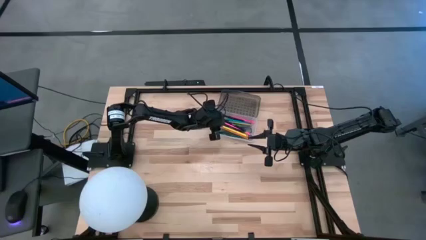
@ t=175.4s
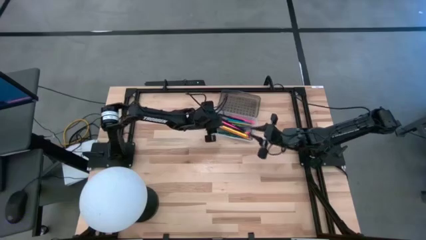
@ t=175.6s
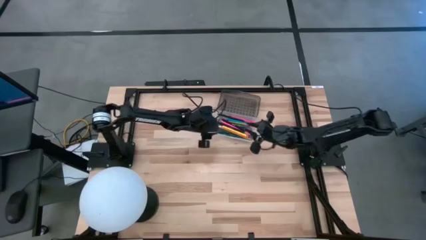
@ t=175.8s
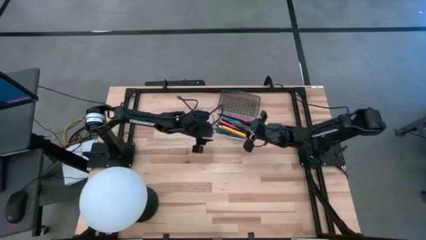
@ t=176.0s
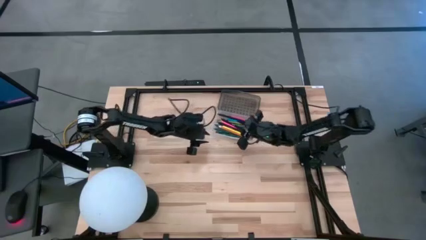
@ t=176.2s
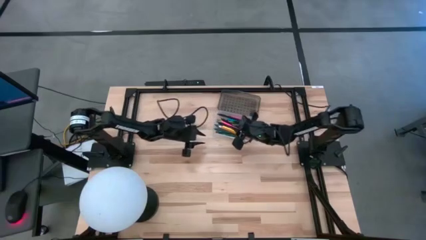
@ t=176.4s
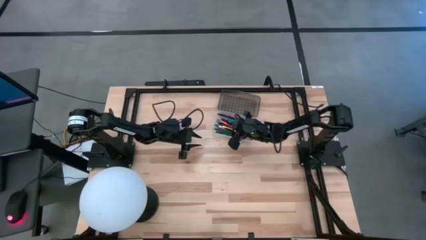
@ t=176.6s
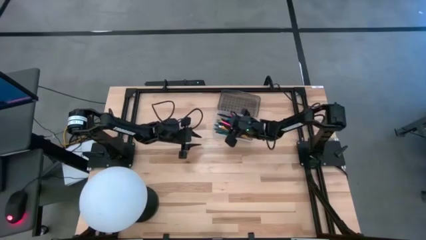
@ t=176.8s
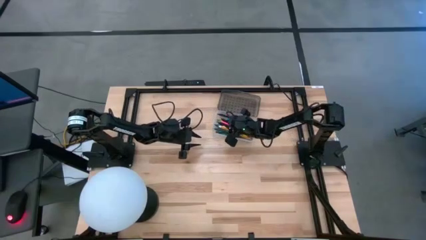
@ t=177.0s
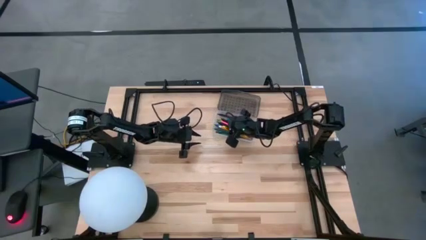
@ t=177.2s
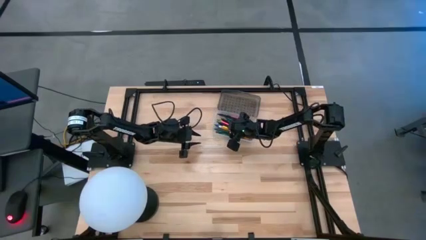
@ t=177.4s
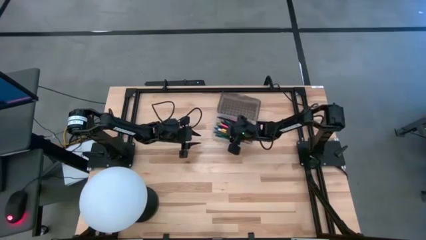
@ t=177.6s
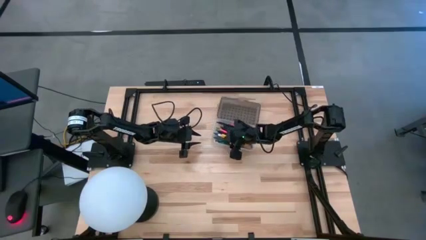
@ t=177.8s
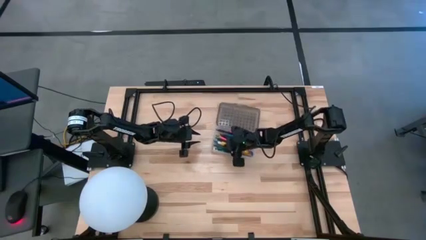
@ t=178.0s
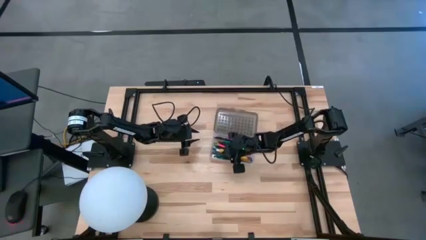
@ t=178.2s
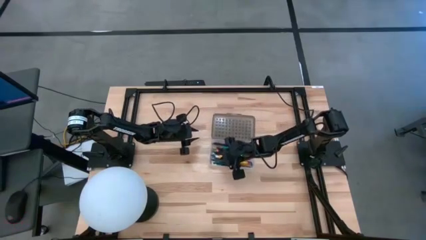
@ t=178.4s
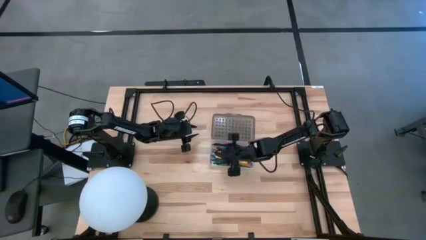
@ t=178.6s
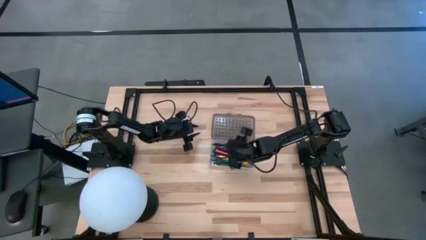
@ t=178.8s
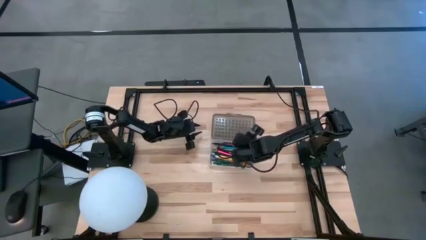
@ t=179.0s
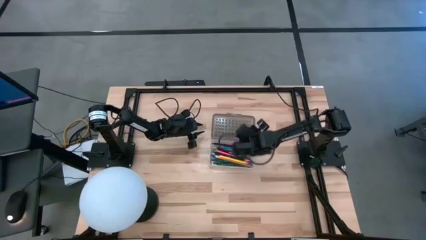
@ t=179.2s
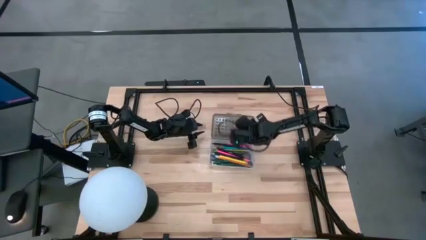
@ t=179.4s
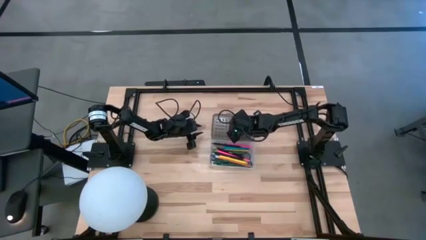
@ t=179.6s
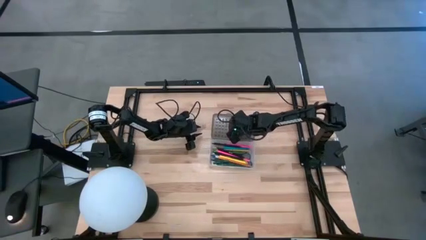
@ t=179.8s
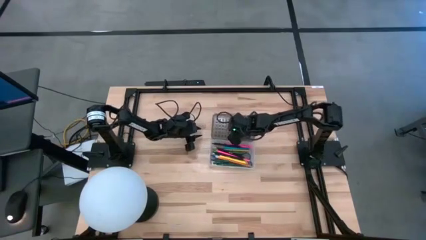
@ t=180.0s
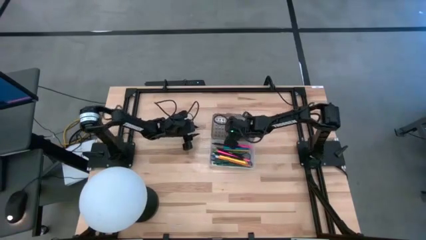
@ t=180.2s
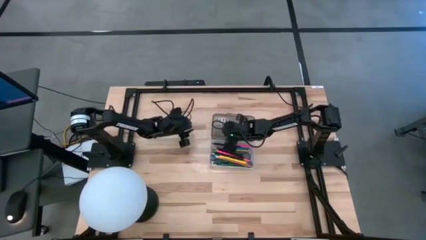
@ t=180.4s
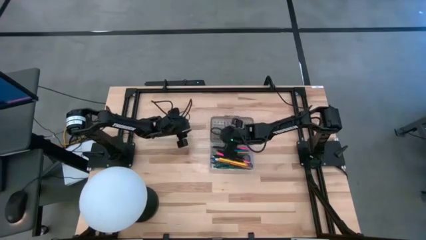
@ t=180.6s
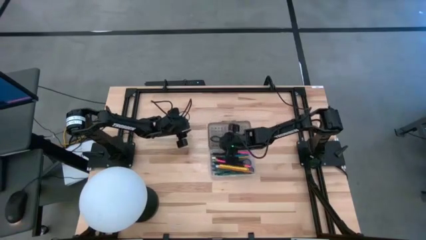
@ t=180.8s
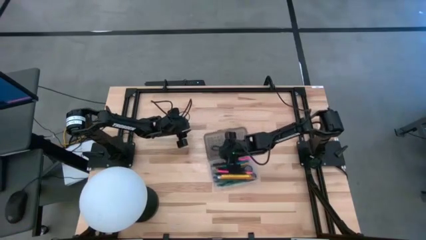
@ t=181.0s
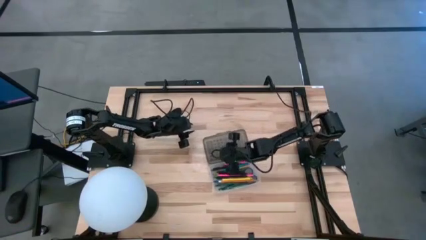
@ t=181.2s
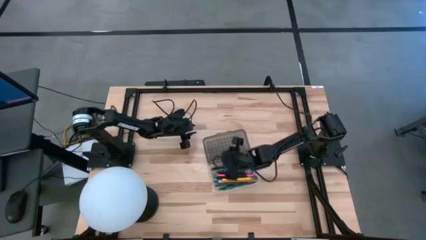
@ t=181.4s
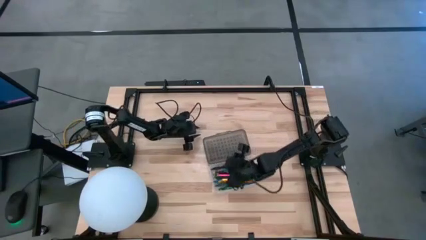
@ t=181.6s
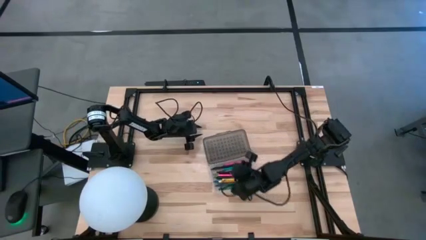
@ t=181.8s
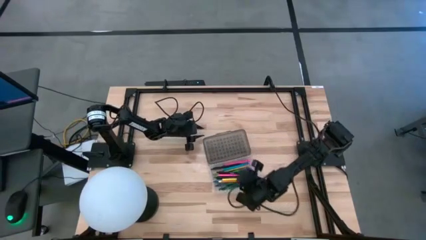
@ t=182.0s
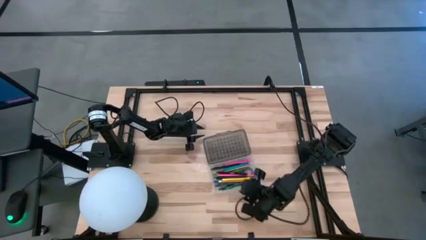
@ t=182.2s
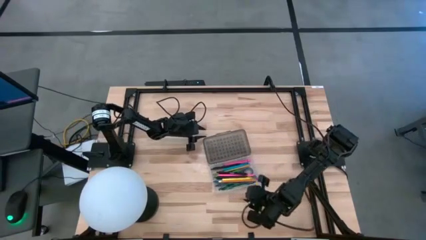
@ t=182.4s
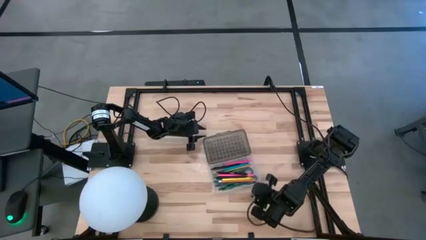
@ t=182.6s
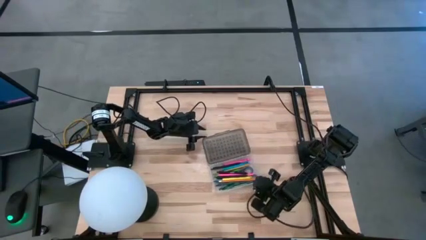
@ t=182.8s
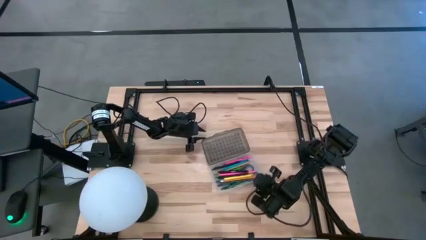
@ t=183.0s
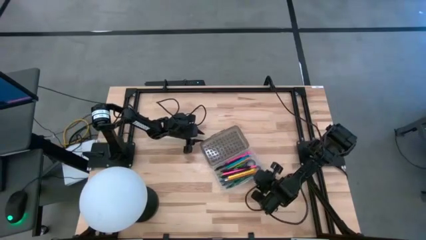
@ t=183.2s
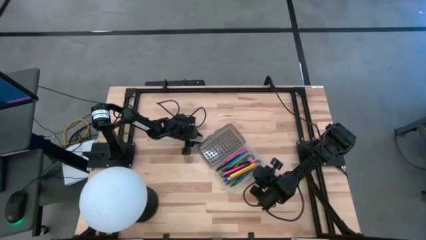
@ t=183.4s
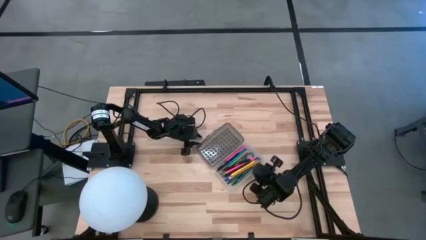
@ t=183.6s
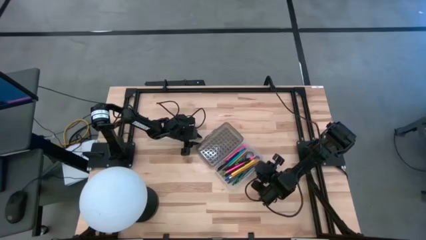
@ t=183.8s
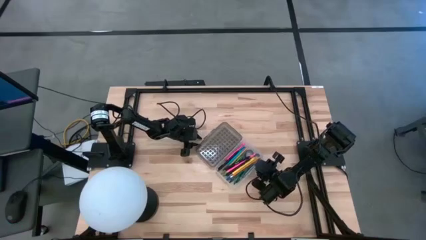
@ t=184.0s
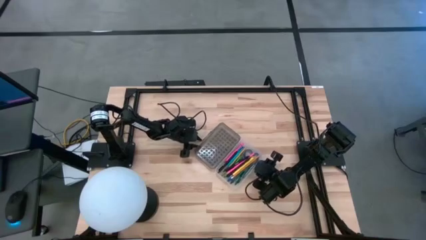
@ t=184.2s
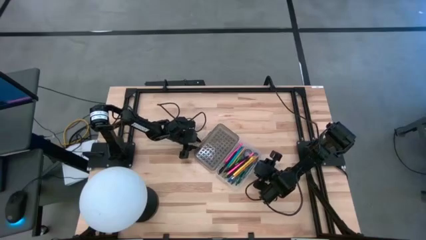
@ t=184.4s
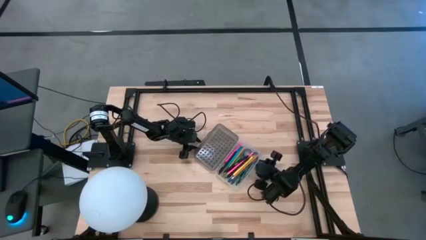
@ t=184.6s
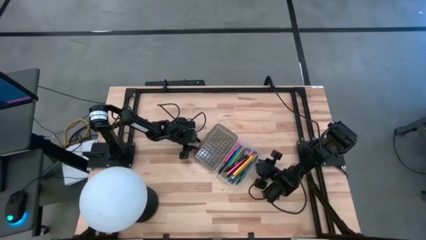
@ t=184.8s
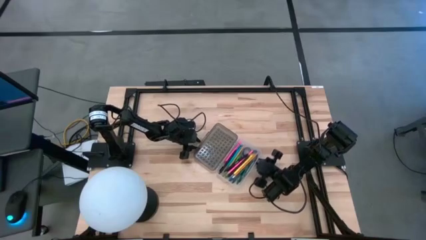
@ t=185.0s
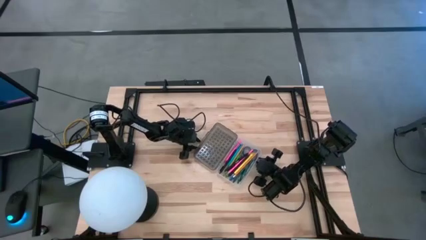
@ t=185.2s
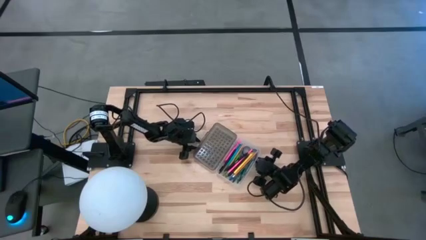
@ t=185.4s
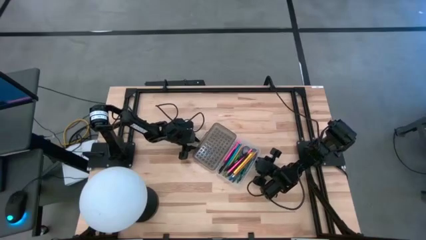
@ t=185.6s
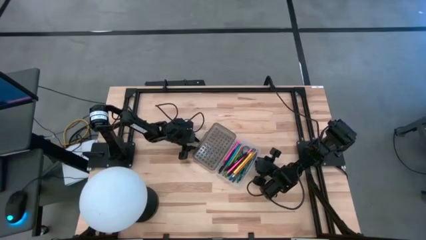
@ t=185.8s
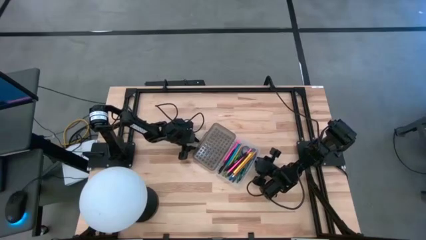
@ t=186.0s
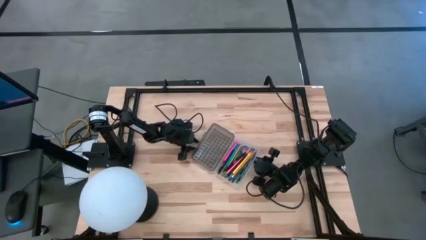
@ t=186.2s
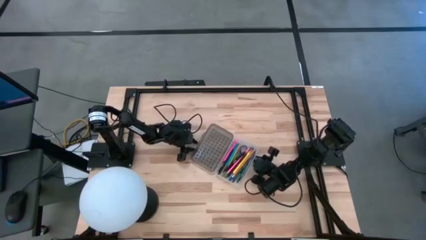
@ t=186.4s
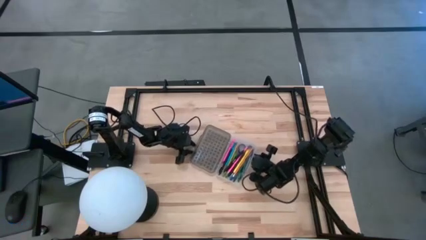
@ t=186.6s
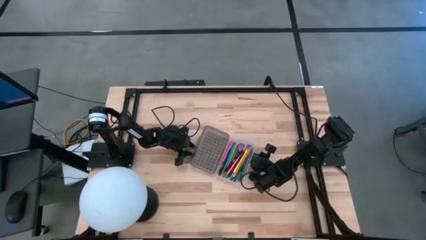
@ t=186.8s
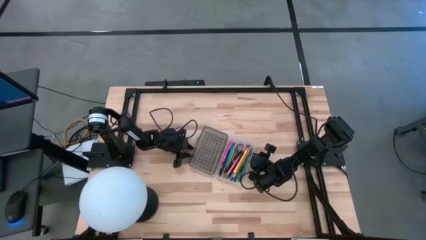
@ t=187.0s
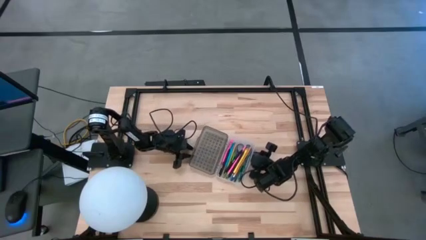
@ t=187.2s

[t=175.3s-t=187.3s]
Task: Pick & place school supplies into a supply box
Adjust the black supply box

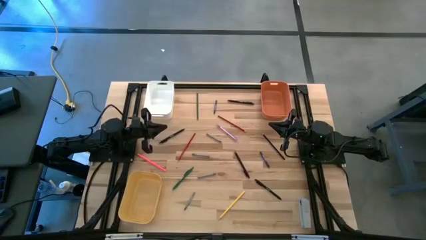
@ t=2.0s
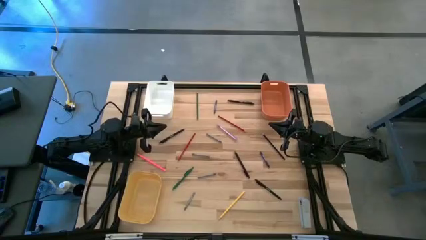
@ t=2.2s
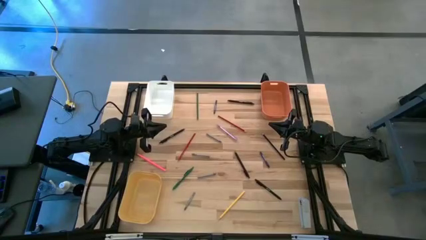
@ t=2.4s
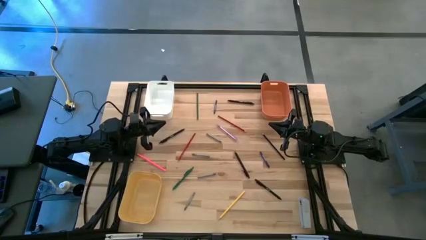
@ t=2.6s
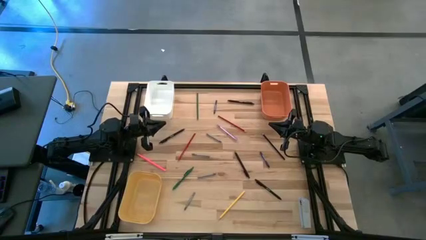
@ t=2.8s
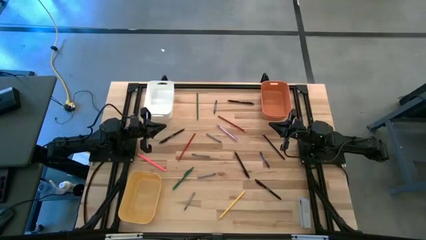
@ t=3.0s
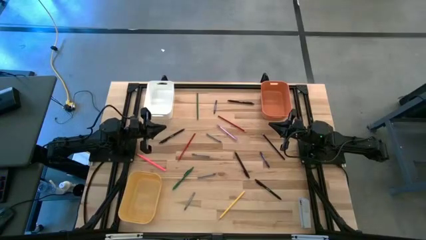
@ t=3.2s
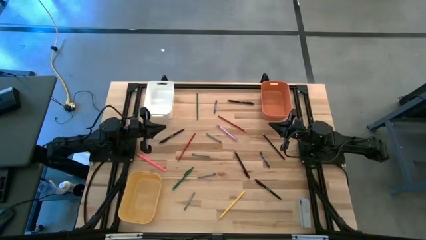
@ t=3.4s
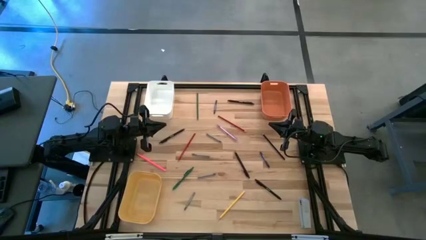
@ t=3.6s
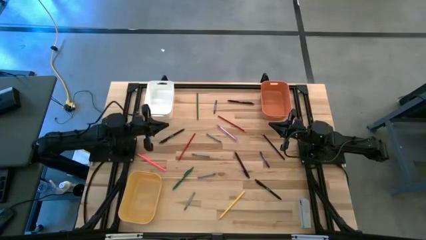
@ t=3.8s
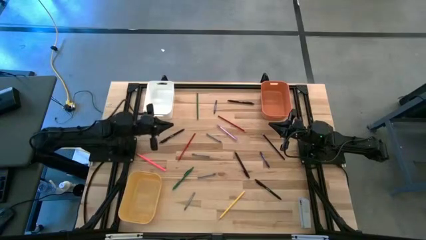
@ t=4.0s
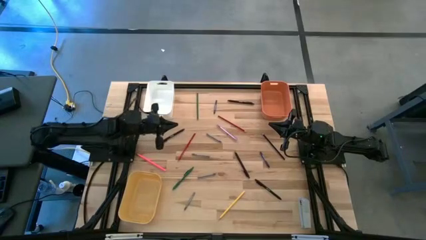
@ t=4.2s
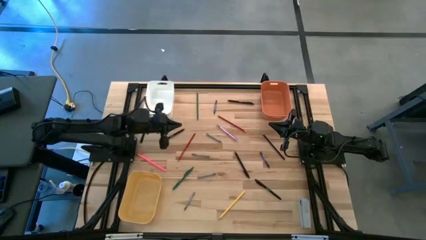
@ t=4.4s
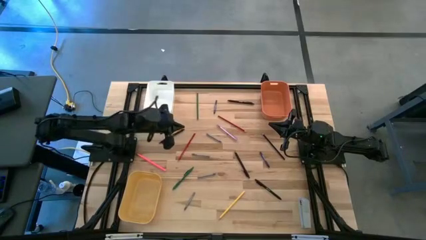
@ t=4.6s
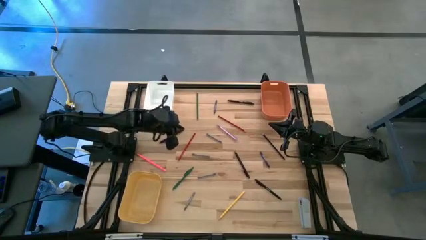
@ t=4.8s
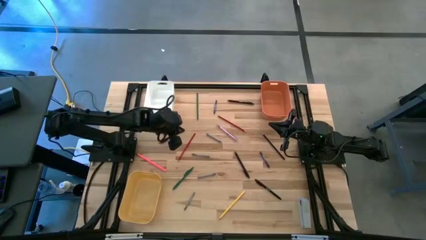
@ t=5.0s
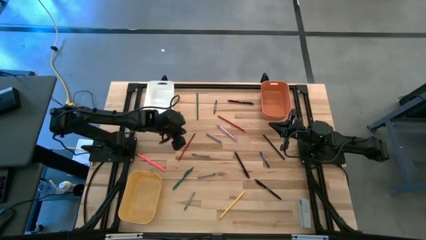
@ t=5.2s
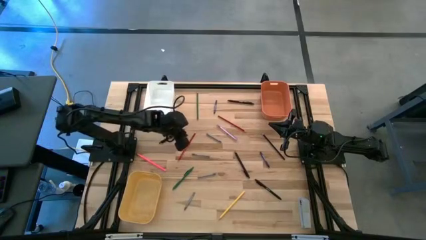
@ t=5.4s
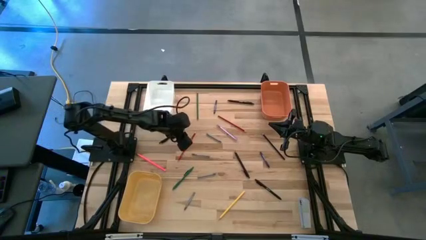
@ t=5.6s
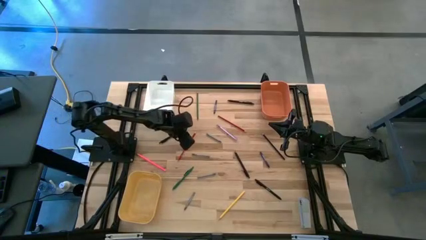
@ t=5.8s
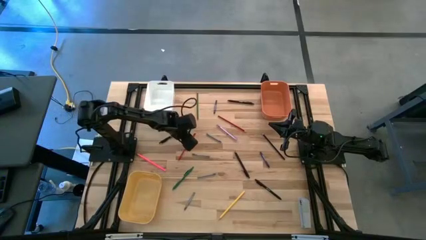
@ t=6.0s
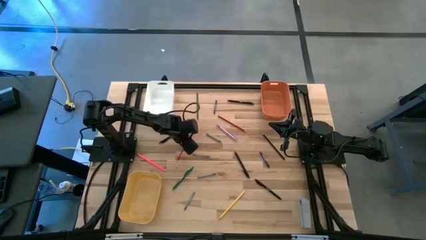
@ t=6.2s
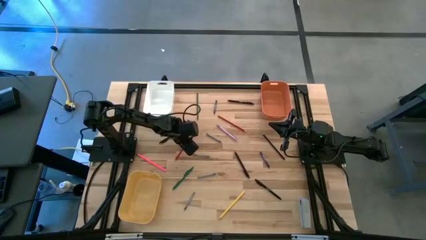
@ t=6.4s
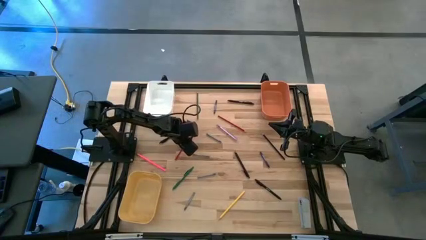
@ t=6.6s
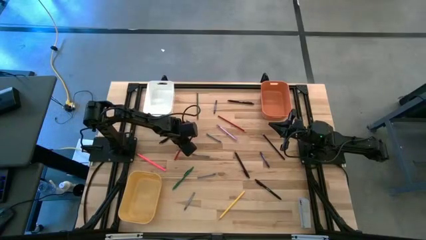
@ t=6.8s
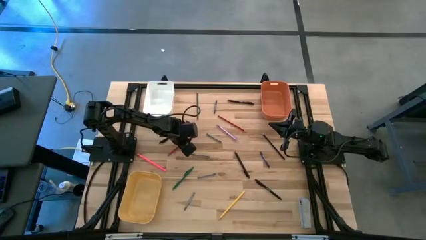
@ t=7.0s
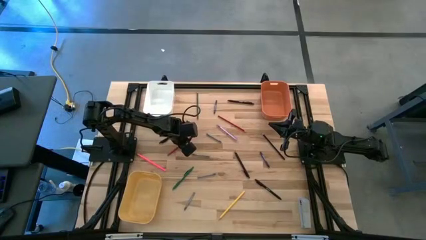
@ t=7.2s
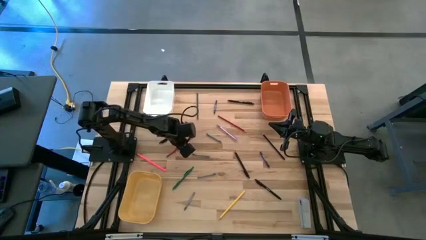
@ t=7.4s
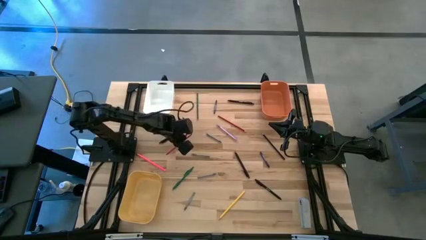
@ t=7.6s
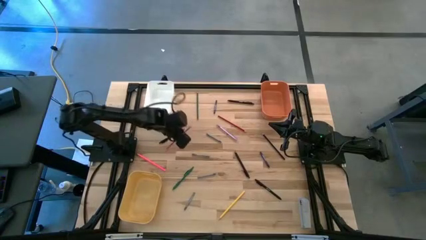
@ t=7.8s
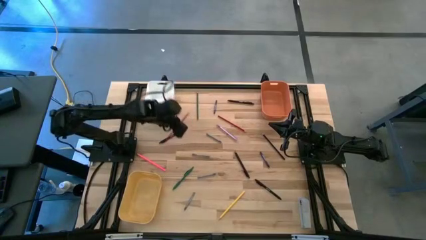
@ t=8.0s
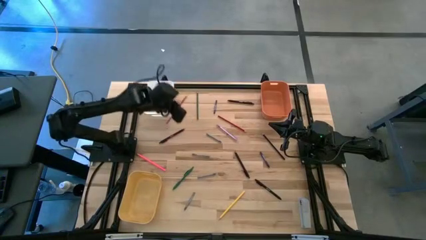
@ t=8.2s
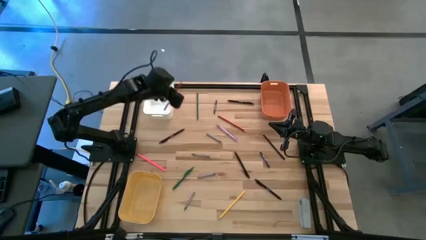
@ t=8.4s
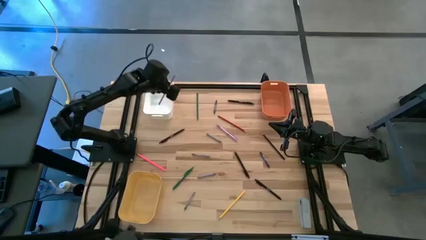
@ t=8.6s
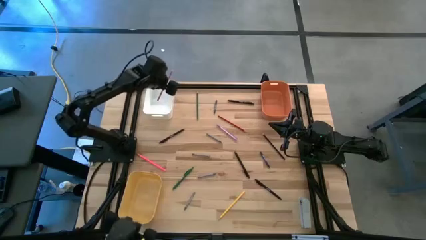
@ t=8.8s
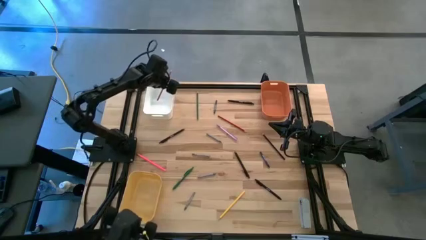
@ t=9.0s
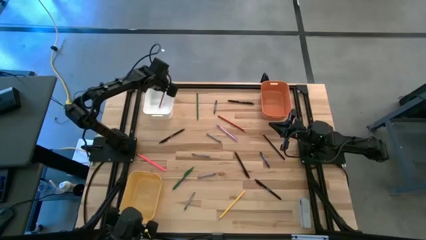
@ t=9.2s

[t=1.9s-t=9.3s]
Task: Sort crayons/erasers/pens/pencils in bins
Put the bottom red pencil into the white bin
